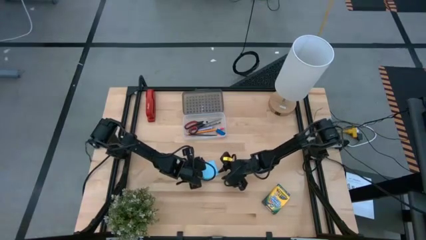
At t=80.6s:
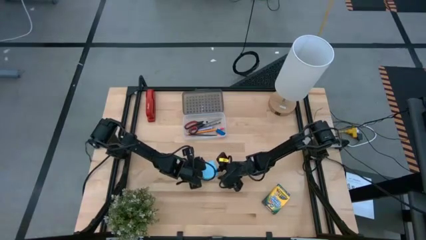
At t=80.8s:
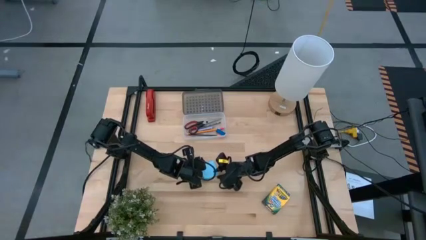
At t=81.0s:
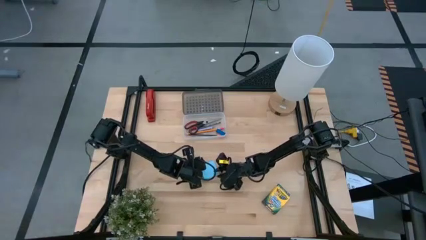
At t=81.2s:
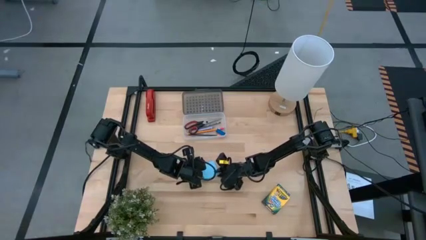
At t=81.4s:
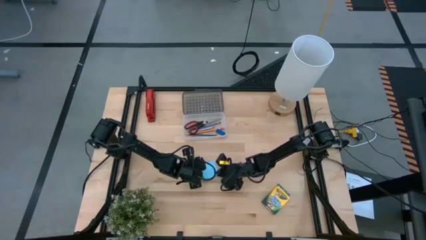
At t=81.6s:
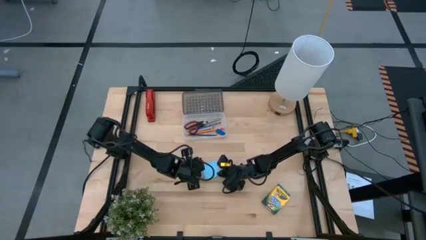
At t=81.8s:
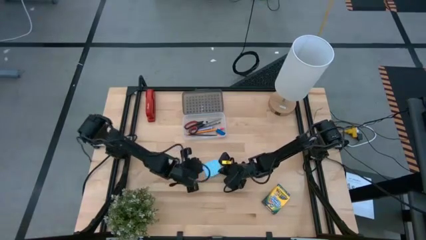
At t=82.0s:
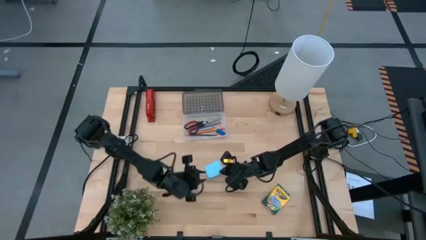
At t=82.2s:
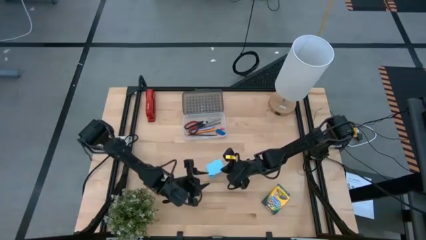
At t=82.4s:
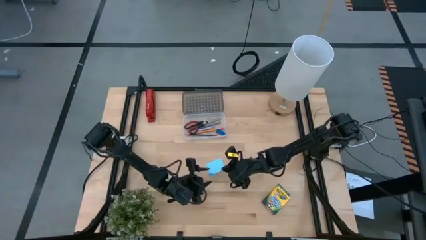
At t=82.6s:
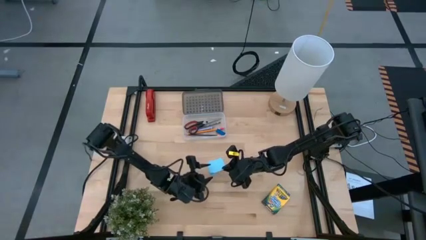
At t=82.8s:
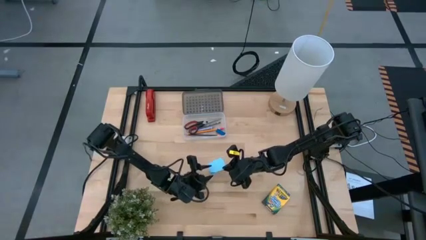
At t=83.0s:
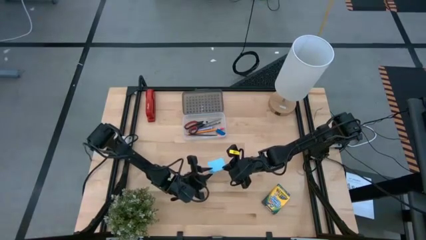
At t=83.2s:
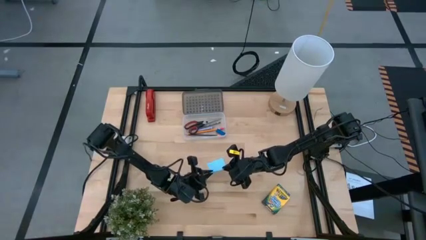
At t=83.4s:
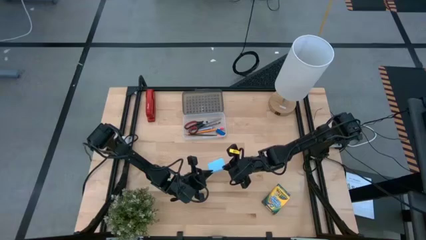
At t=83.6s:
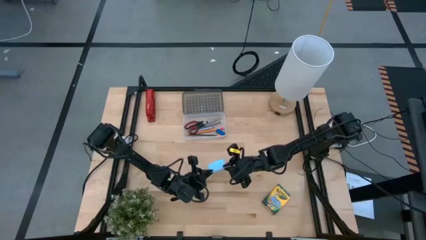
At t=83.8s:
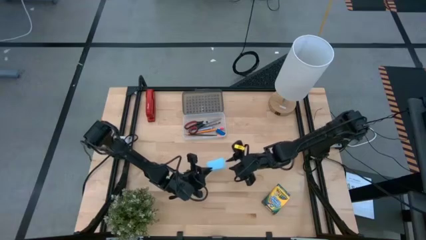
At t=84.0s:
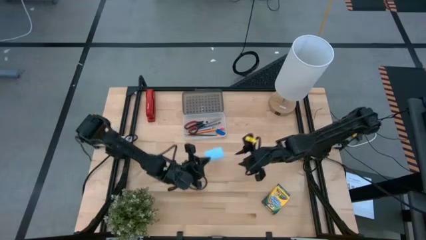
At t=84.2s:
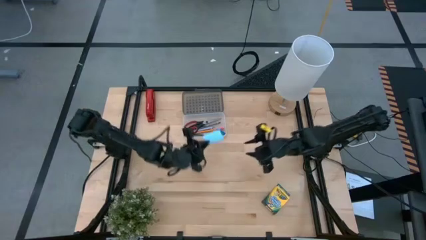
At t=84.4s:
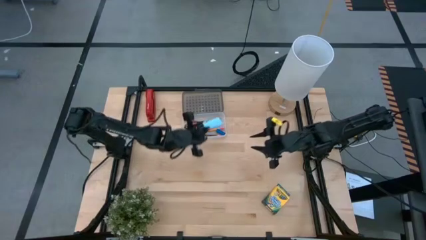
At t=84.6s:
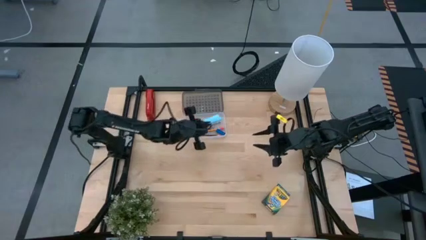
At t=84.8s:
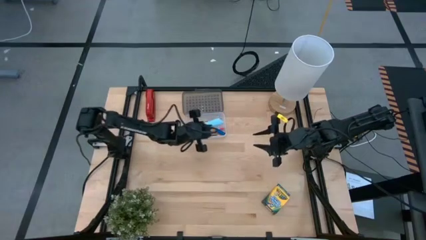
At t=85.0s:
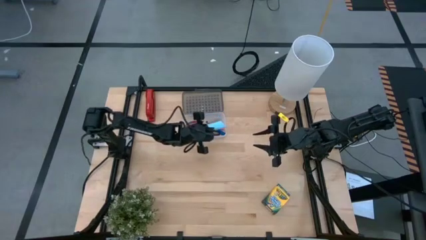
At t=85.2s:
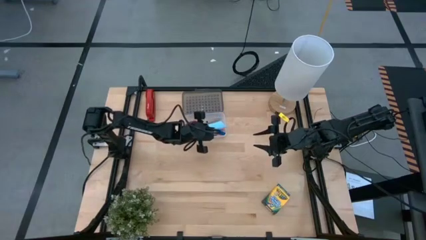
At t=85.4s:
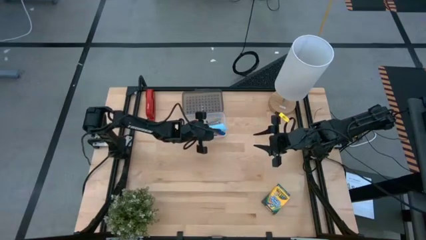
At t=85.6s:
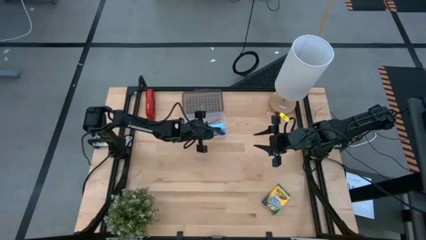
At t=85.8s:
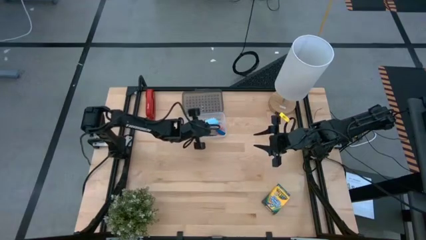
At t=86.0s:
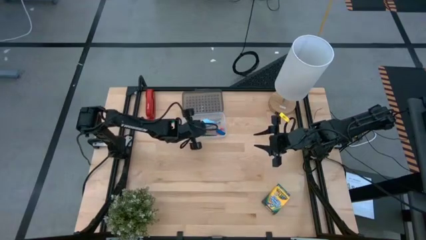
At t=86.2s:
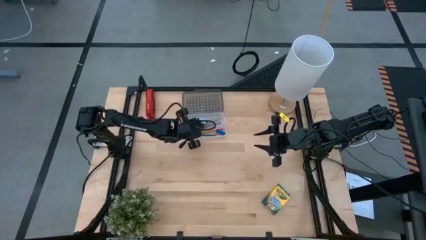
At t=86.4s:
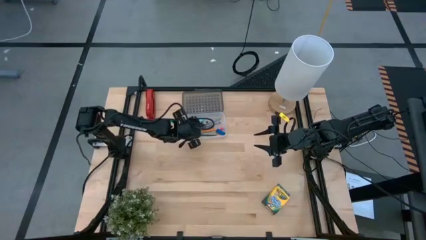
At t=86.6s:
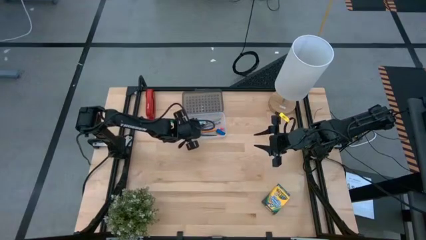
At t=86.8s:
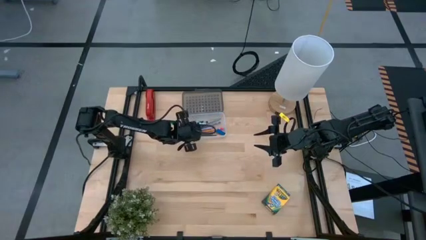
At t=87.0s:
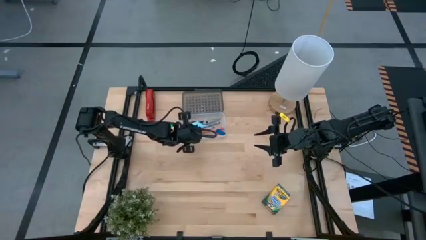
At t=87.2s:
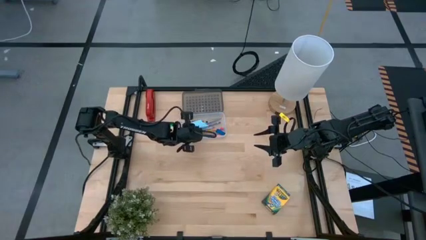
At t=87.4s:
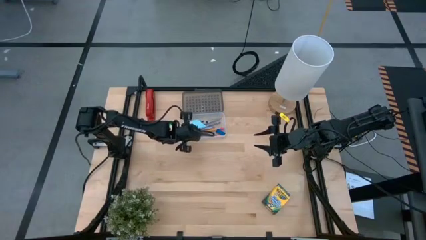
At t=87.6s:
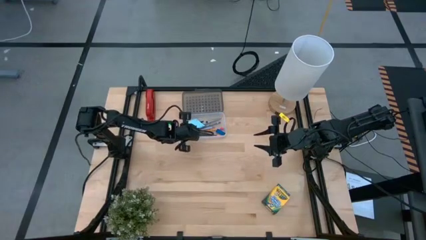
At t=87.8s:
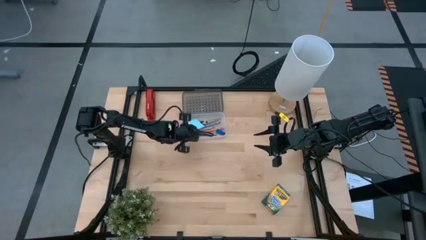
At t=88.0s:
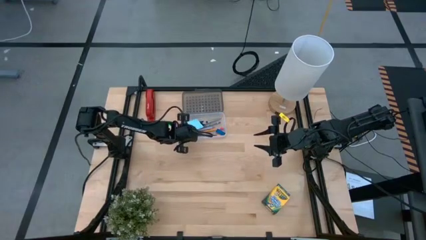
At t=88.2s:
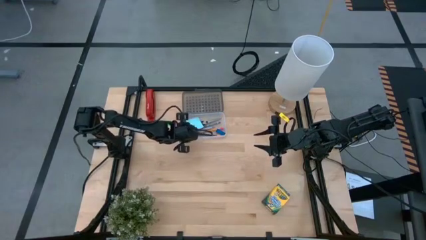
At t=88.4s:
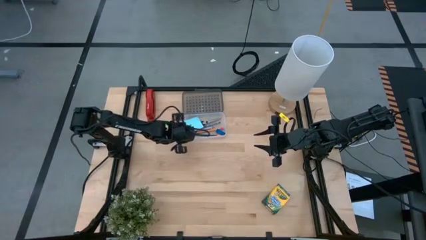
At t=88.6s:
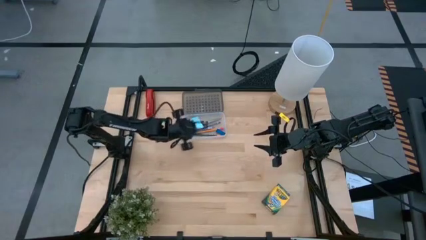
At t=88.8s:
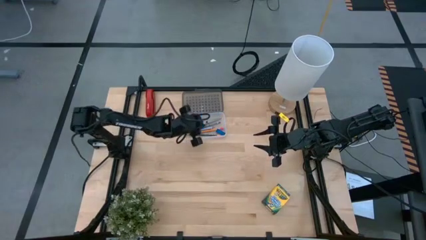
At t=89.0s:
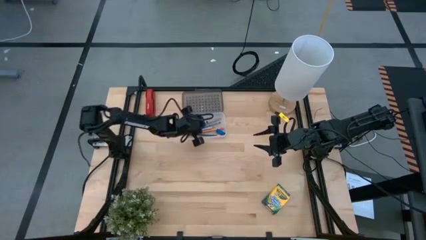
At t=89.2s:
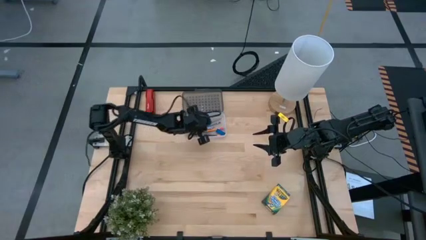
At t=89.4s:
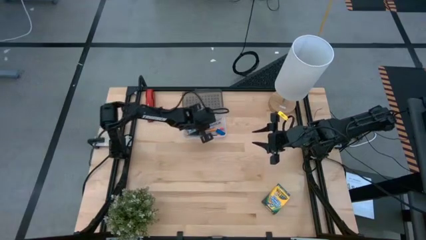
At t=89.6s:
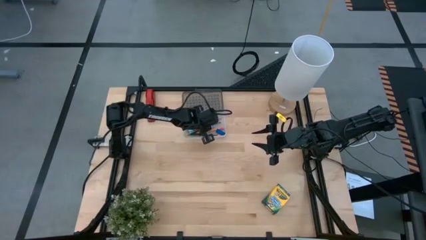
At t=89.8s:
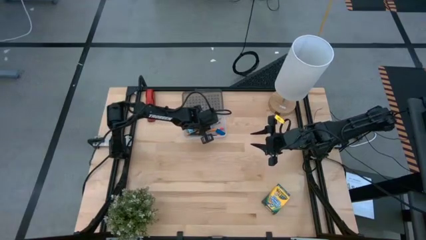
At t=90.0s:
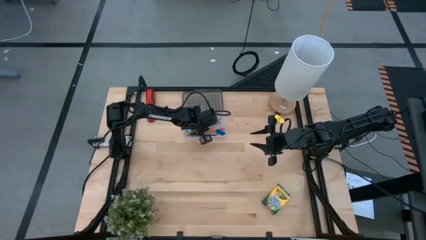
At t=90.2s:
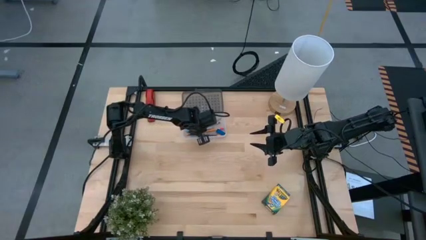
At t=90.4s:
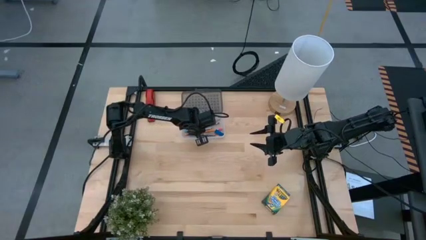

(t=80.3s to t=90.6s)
Task: Pack school essentials
Put the blue sticky note into the black supply box

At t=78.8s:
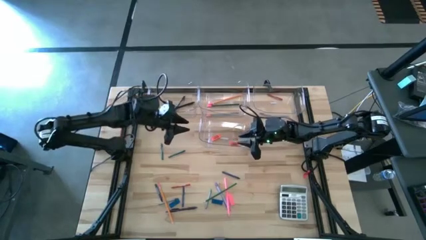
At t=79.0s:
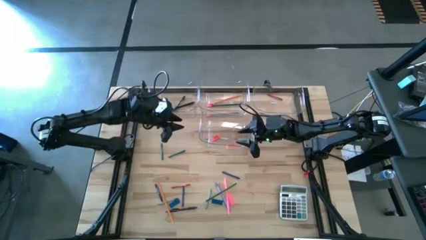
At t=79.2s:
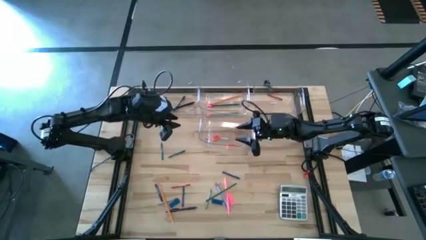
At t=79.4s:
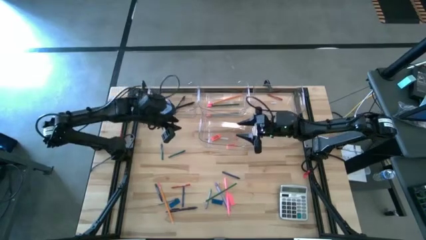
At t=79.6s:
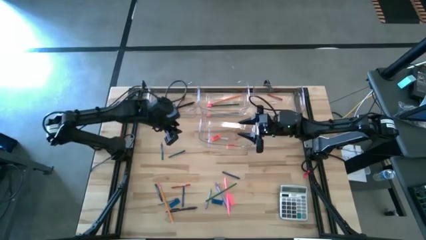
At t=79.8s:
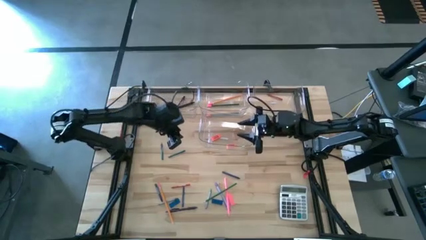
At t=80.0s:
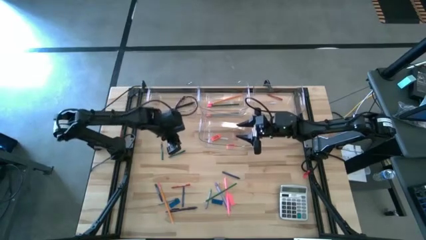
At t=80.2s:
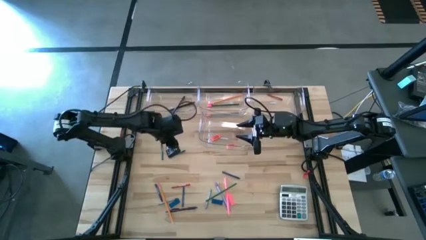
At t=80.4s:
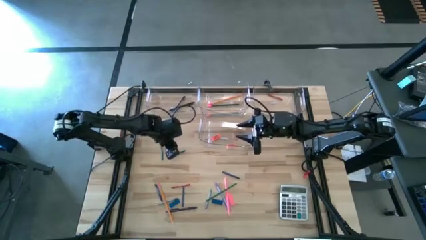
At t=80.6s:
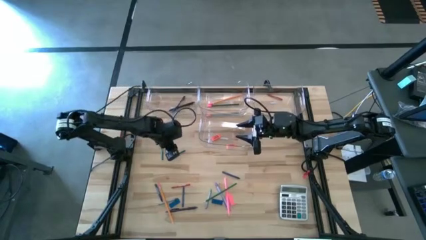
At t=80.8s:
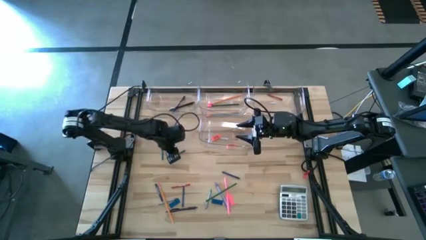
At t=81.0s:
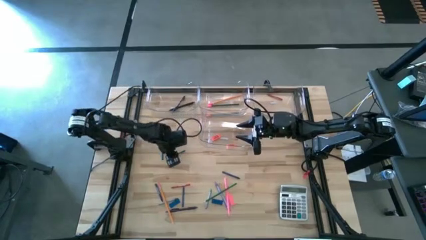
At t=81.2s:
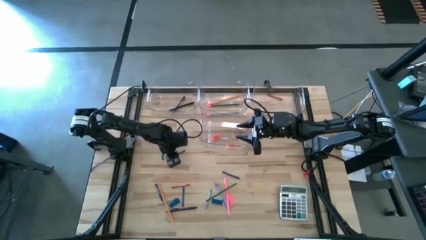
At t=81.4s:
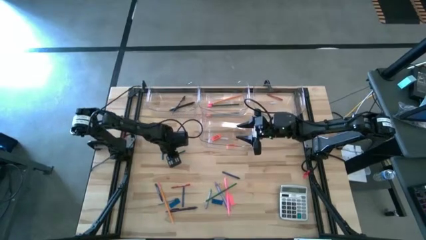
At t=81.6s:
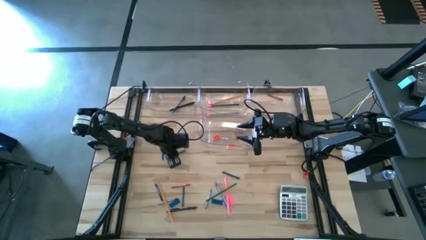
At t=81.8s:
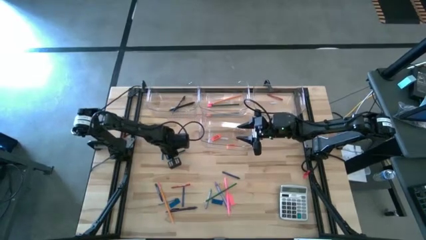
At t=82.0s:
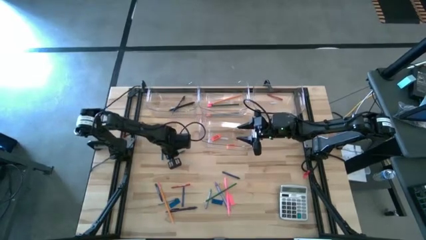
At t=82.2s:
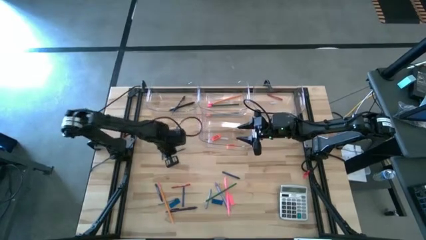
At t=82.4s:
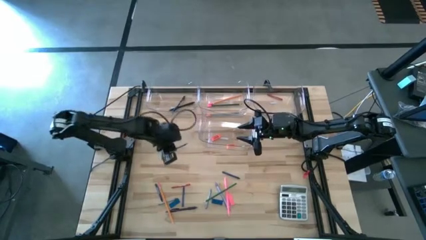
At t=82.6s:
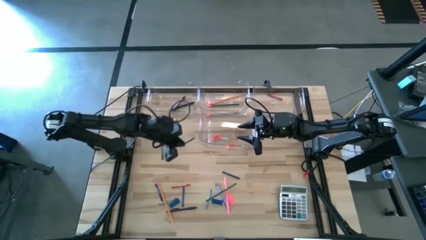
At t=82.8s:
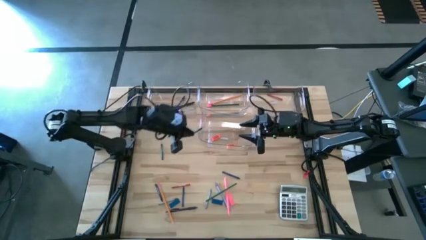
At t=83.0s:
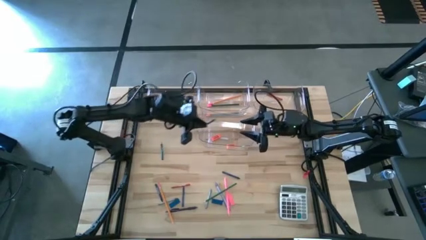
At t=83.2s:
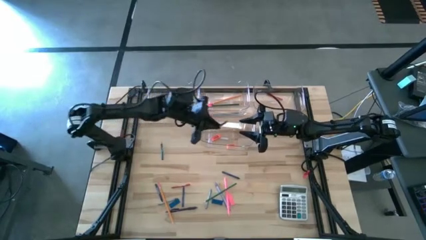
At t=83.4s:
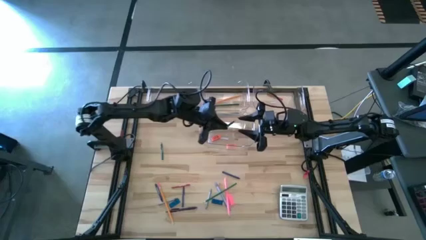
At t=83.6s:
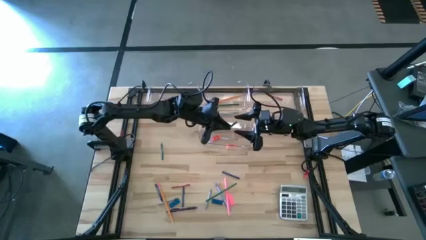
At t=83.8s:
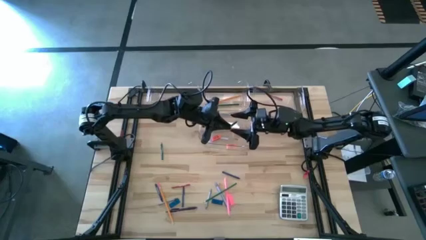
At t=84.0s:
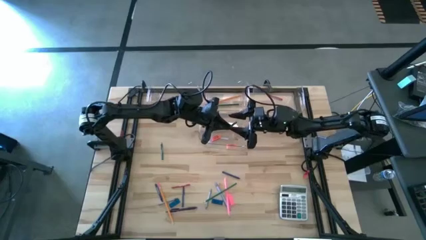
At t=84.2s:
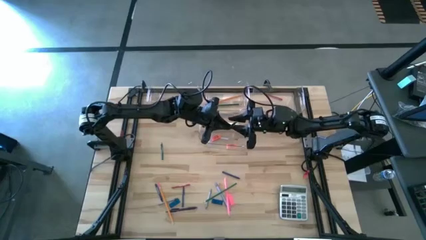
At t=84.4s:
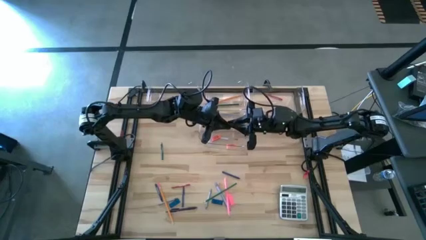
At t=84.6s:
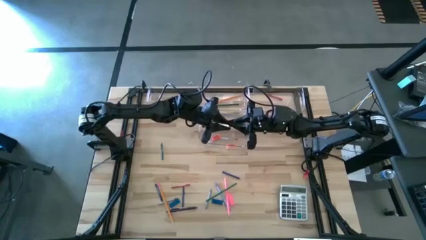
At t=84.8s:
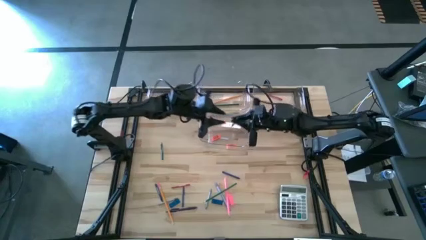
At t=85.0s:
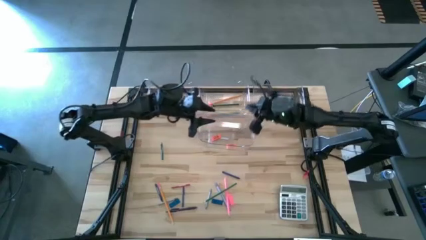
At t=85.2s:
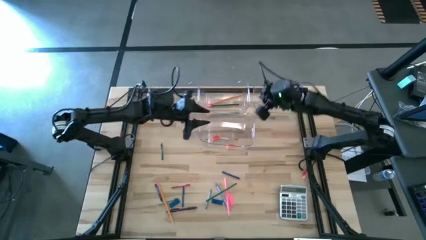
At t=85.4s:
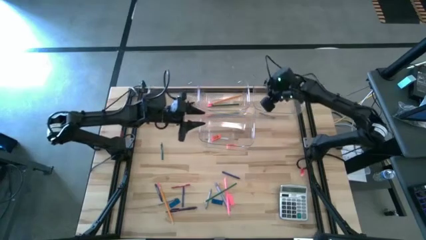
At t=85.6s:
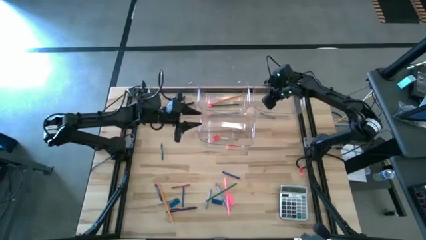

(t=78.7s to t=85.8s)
Task: Sort crayons/erasers/pens/pencils in bins
Put the green crayon into the top right transparent bin
